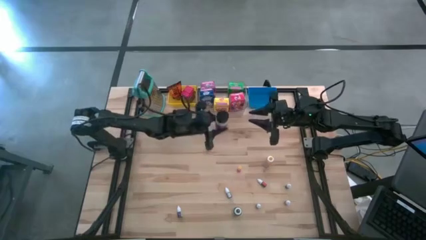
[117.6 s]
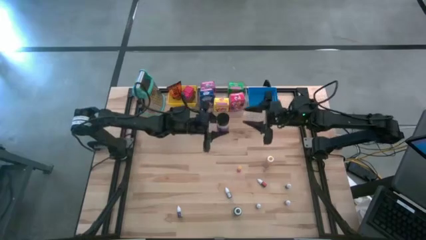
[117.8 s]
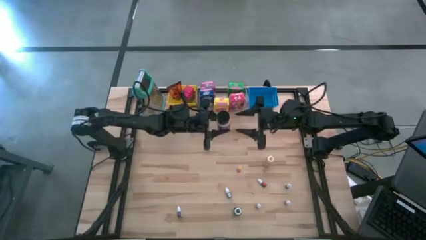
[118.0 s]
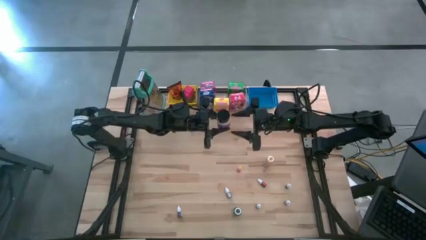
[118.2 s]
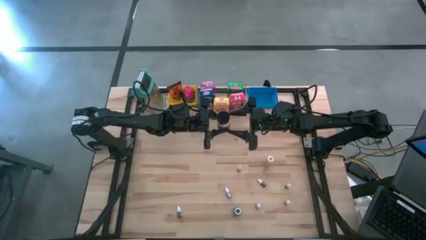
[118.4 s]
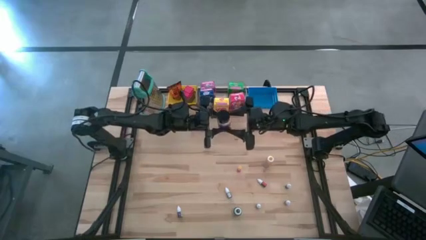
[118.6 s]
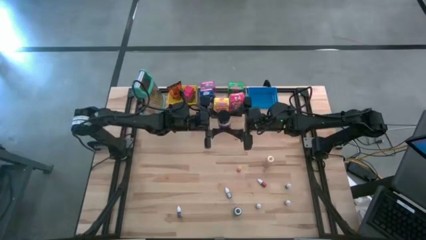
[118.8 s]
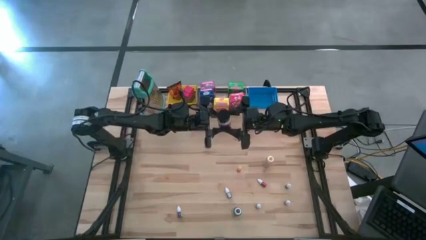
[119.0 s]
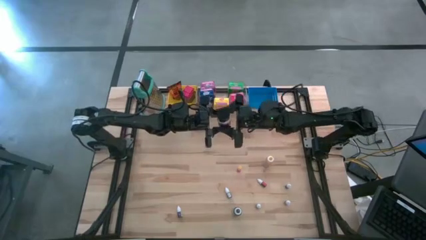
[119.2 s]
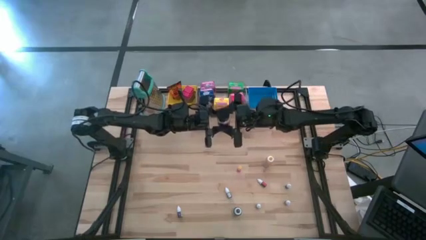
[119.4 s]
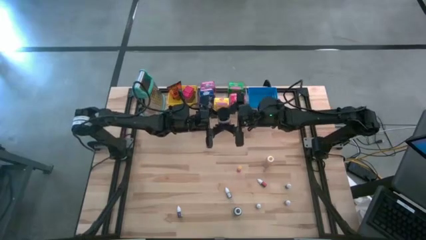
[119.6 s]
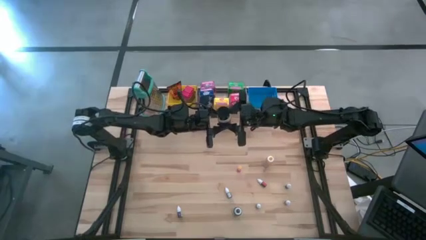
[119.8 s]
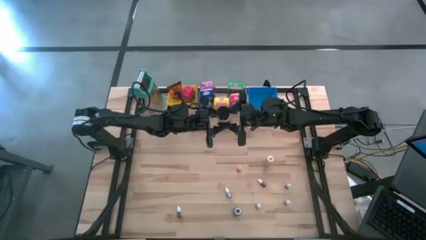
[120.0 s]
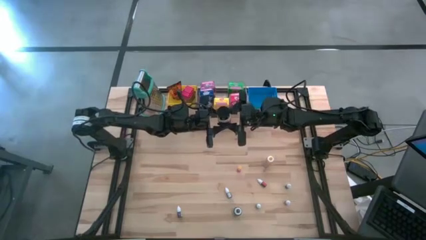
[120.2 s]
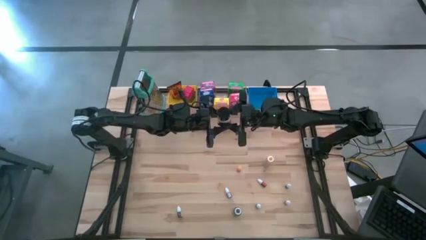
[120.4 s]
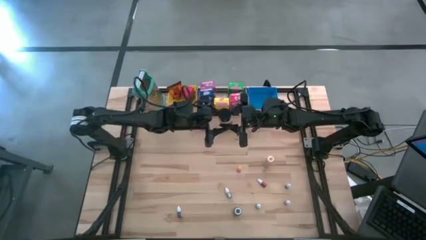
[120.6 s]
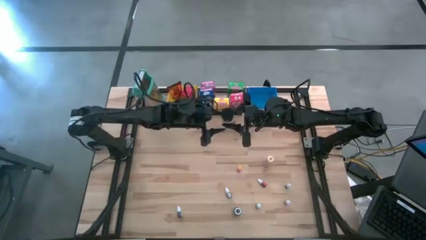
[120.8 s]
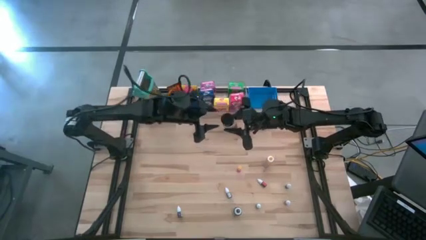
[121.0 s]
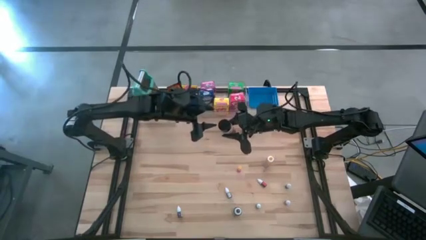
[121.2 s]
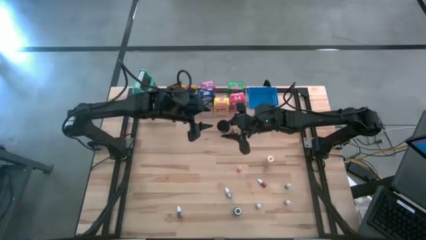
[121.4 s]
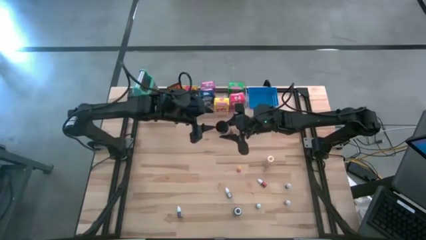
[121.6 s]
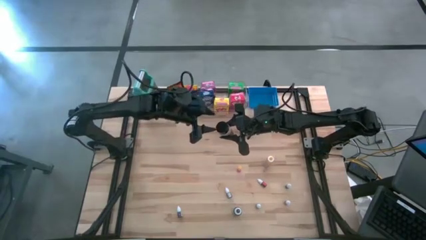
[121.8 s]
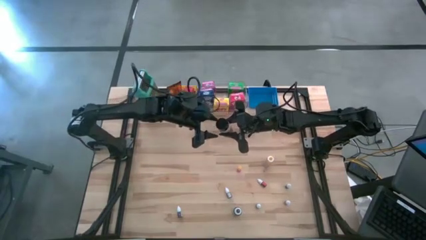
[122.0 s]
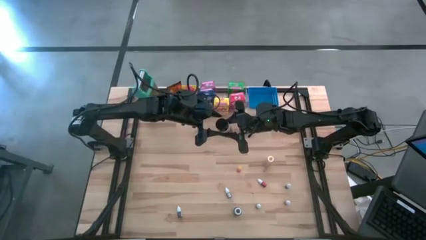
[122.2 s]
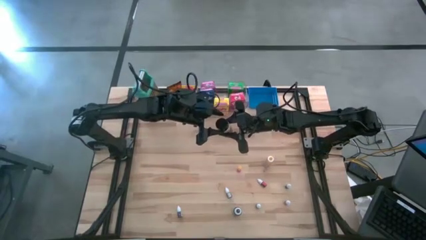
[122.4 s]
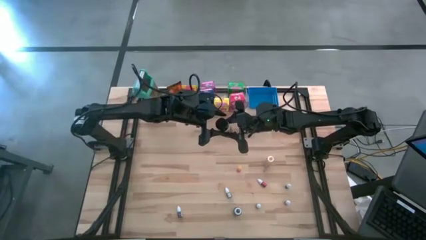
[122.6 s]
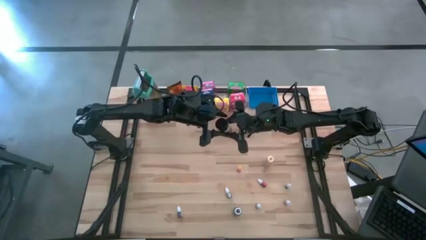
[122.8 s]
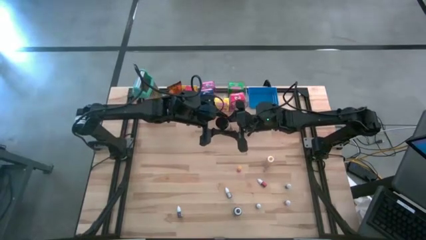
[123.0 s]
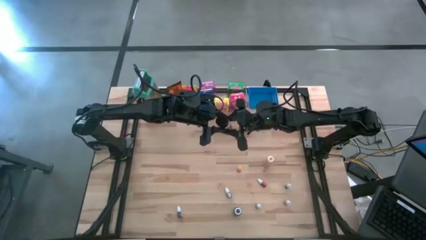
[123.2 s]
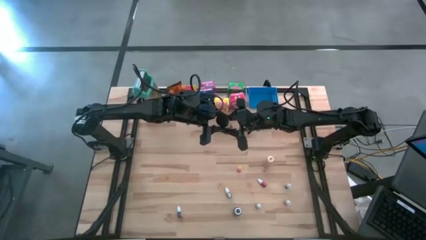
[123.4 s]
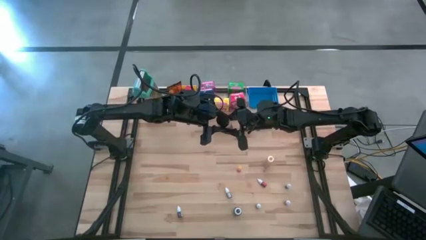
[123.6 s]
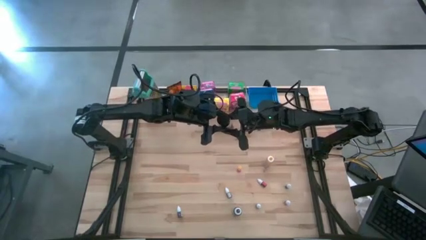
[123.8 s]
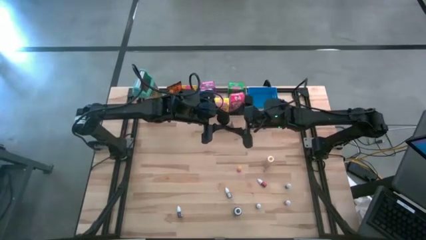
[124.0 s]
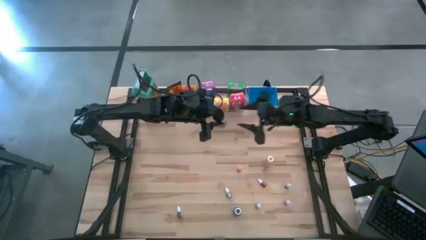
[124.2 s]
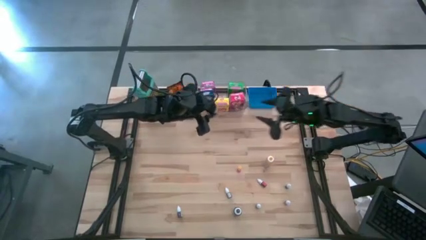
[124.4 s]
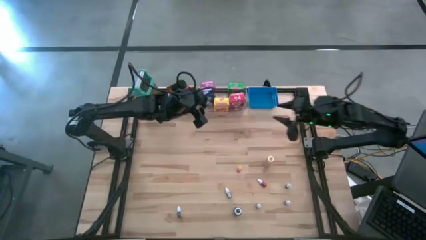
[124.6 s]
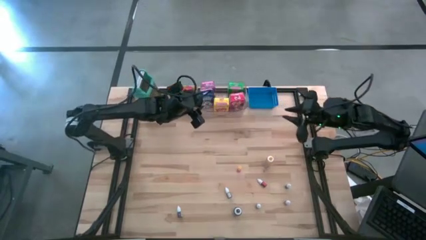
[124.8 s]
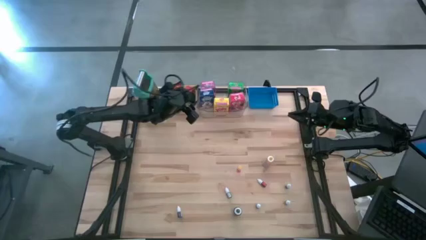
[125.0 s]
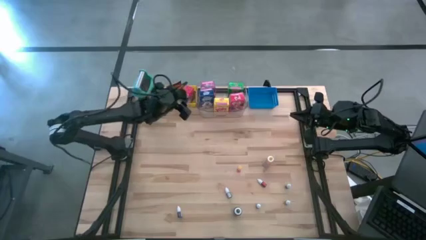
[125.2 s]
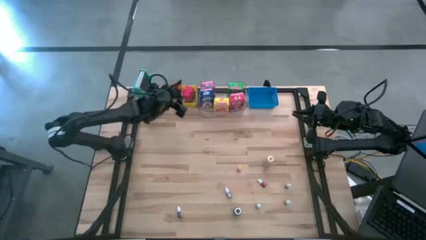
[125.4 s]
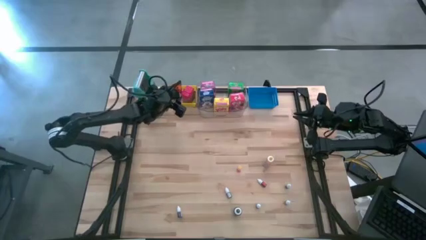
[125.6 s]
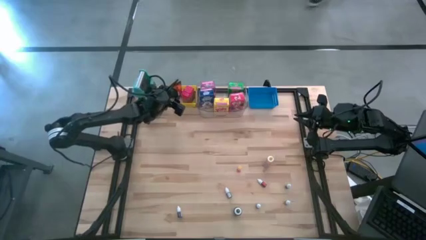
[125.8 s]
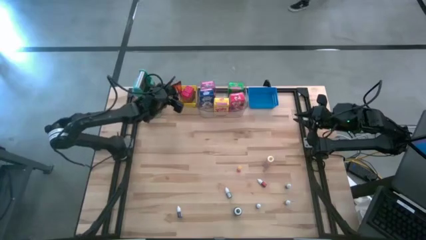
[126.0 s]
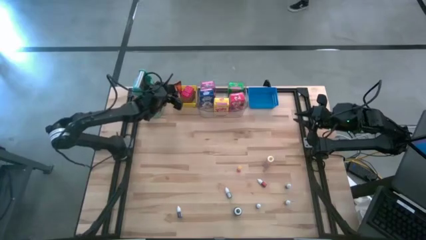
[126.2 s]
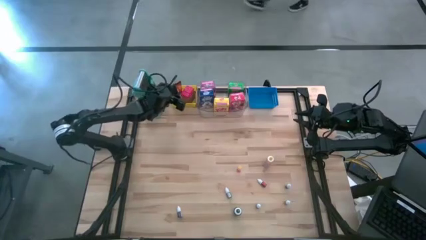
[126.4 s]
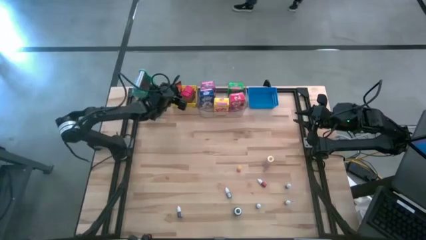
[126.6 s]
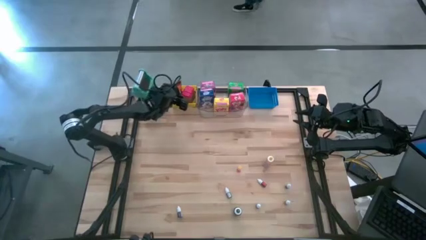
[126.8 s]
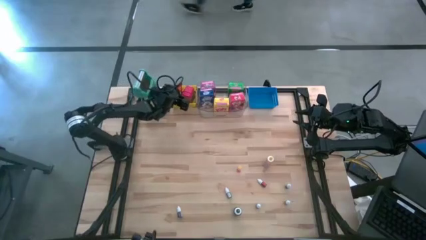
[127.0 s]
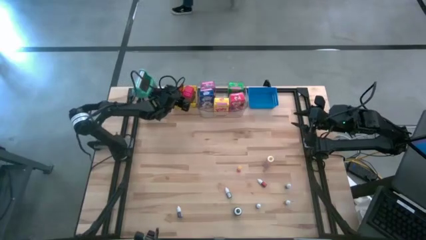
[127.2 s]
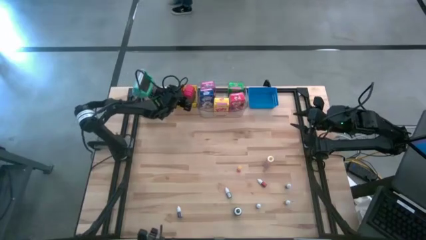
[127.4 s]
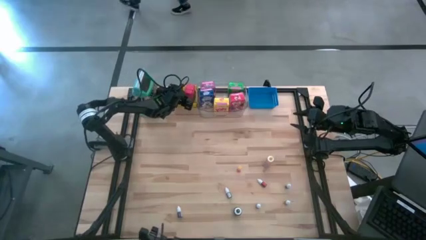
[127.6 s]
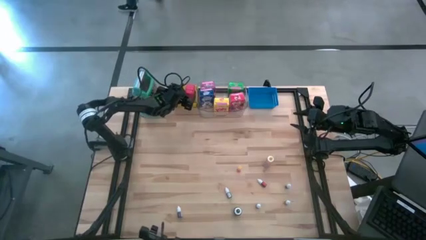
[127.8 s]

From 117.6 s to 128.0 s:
Task: Pick & Place Kitchen Items
Put the violet seasoning bottle into the yellow bin
